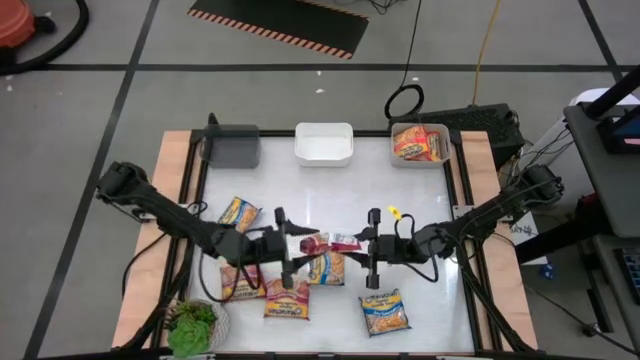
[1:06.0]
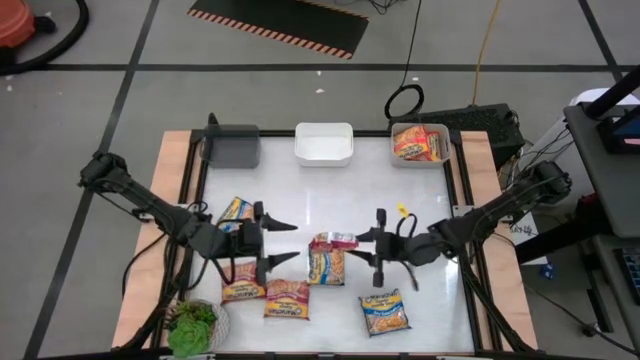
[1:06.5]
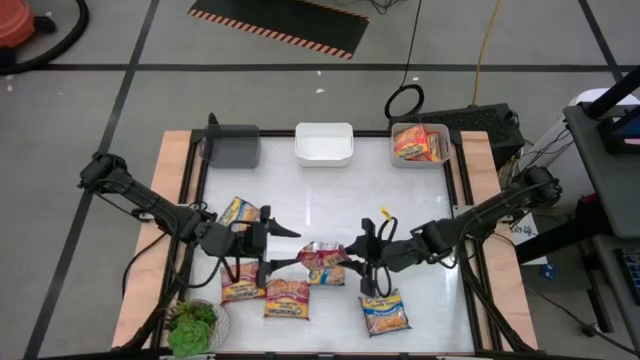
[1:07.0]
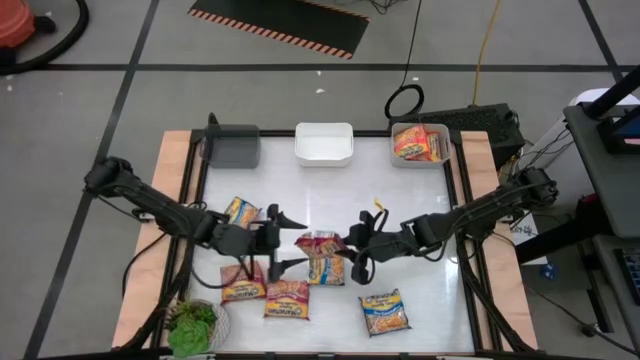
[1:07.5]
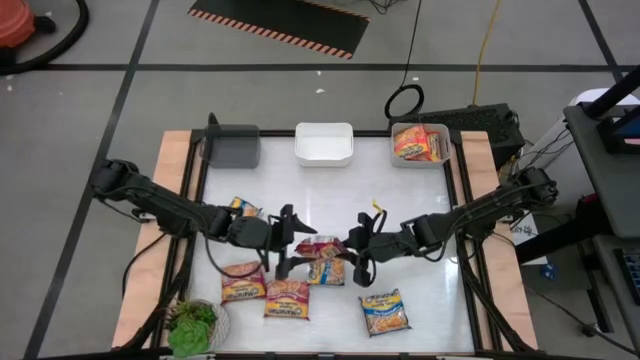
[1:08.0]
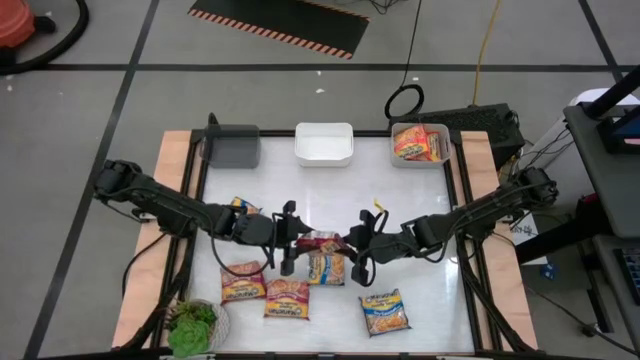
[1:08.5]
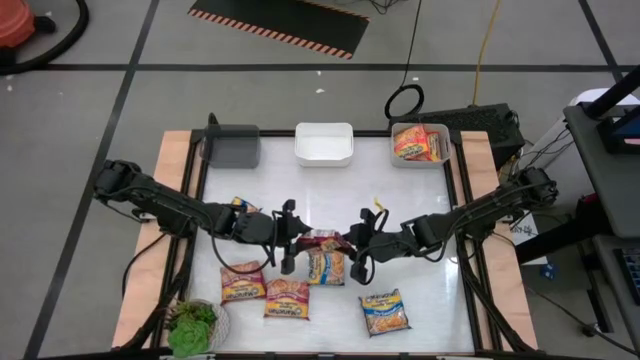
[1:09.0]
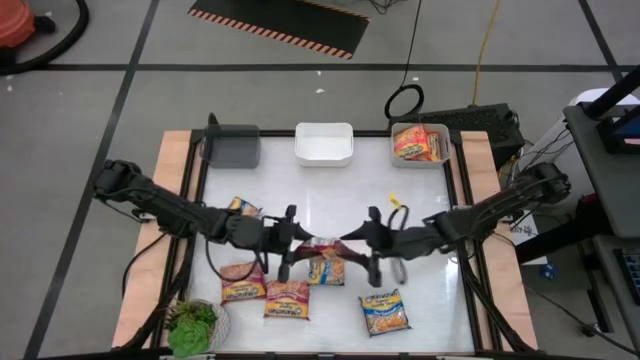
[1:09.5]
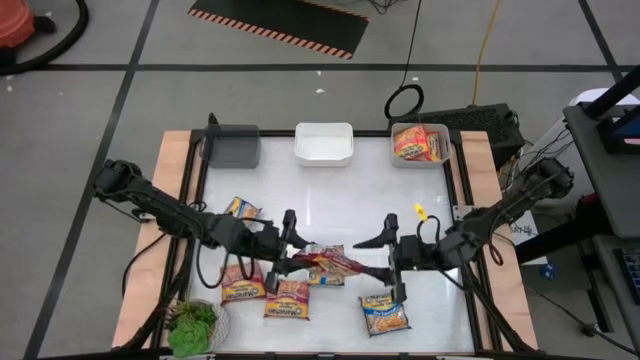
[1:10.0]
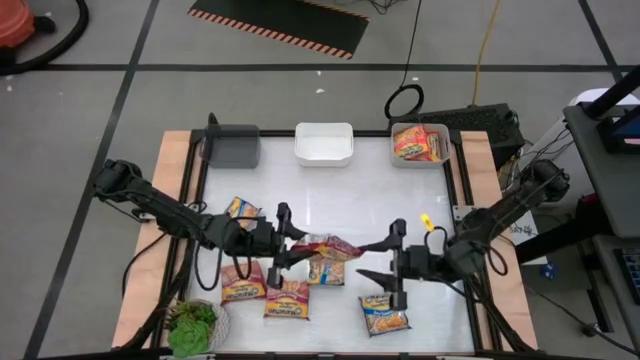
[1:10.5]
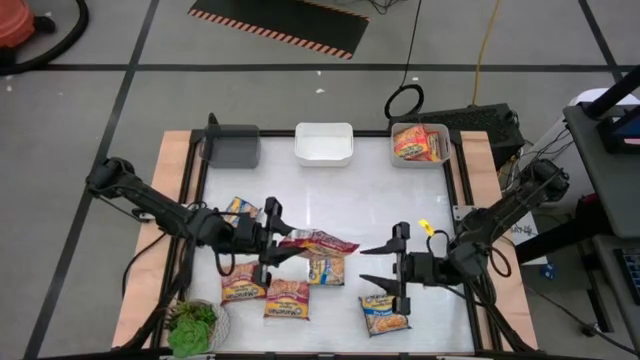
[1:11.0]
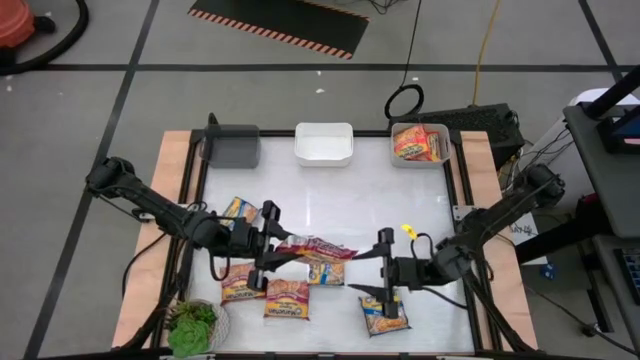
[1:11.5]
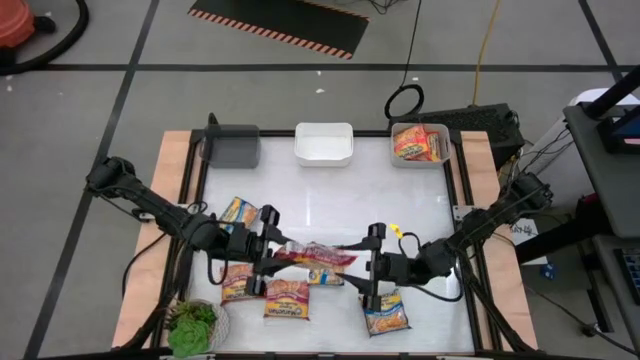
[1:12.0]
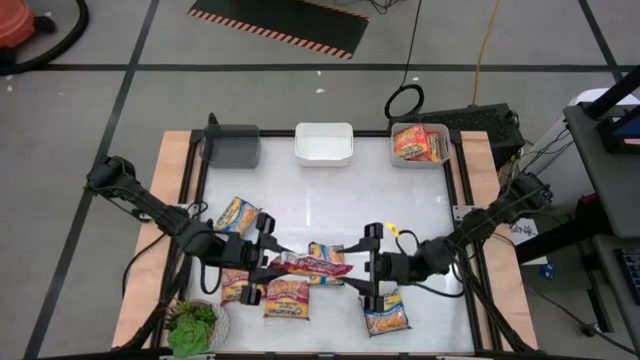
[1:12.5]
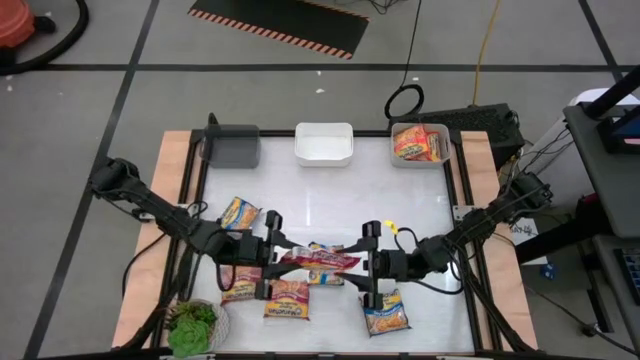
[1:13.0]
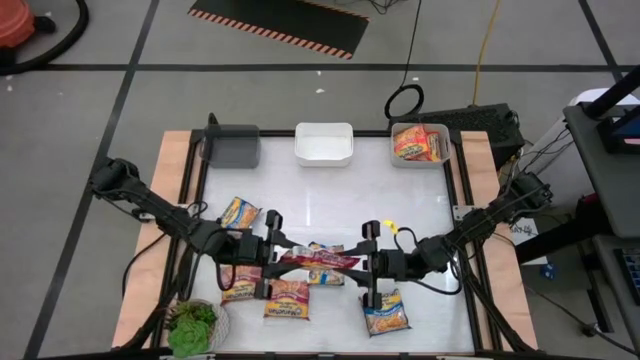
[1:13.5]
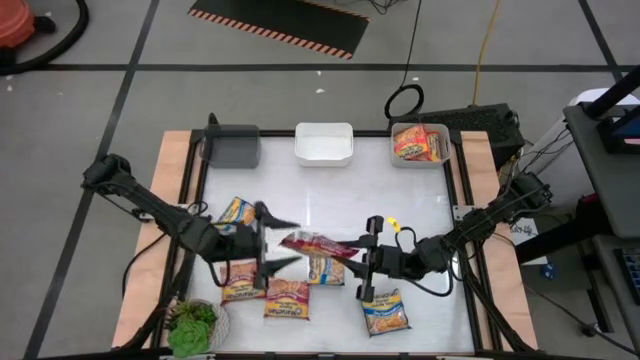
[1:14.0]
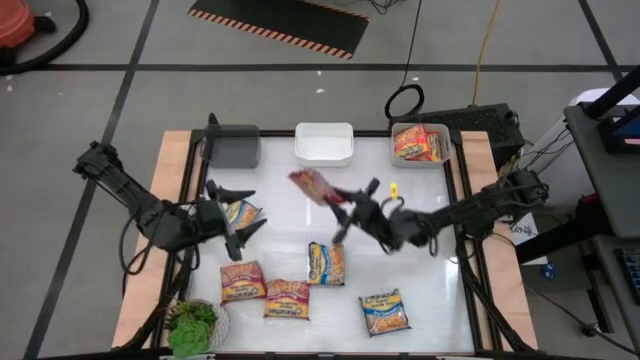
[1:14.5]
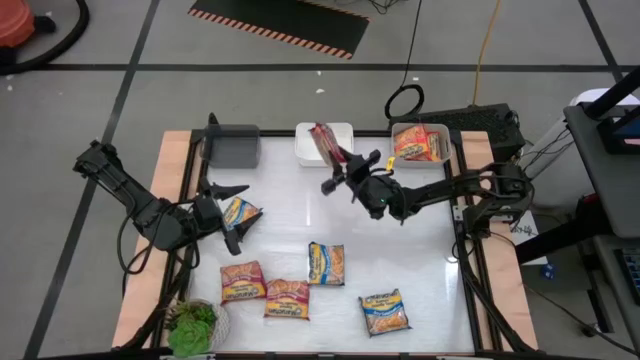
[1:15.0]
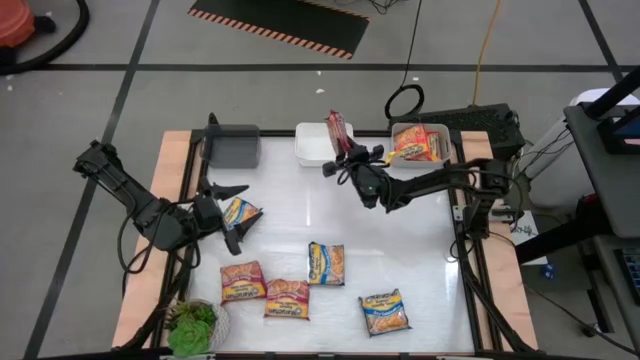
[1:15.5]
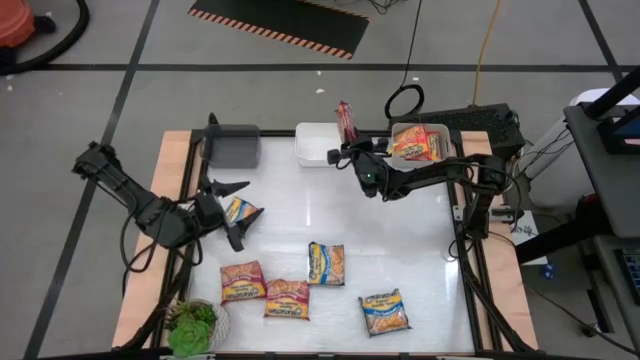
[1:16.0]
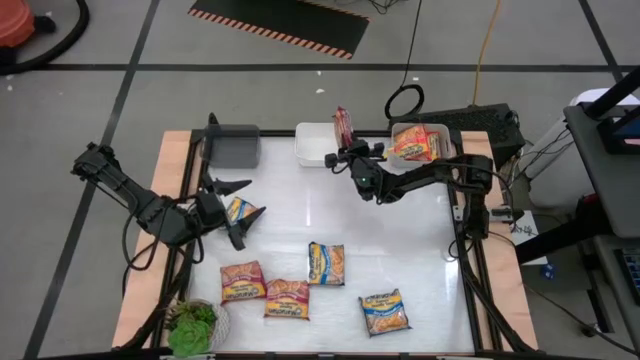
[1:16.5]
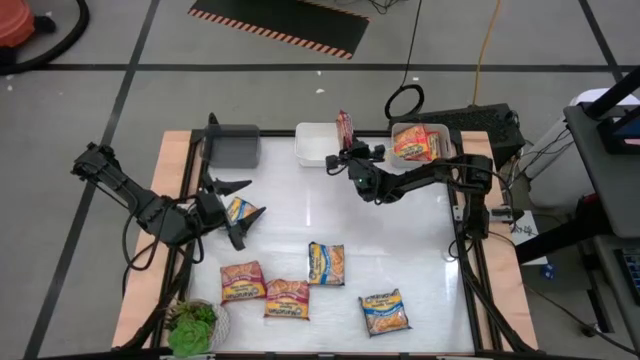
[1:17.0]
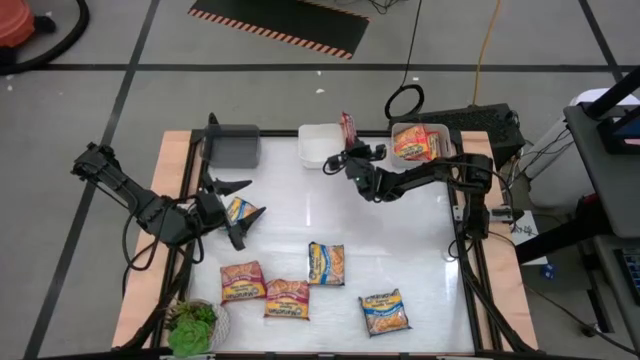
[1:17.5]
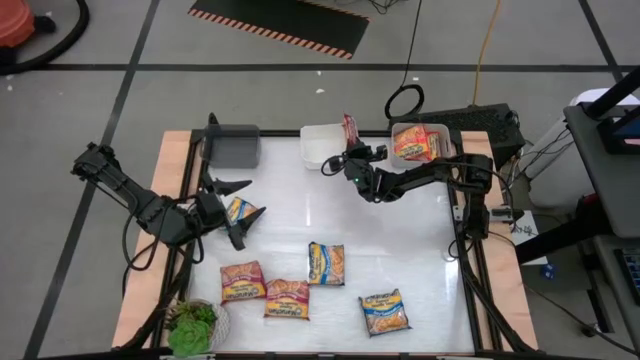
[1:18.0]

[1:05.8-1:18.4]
Task: Sort Maruchan noodles
Put the top red noodle pack into the white bin

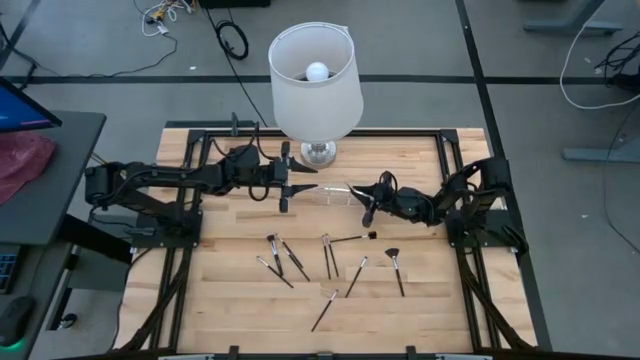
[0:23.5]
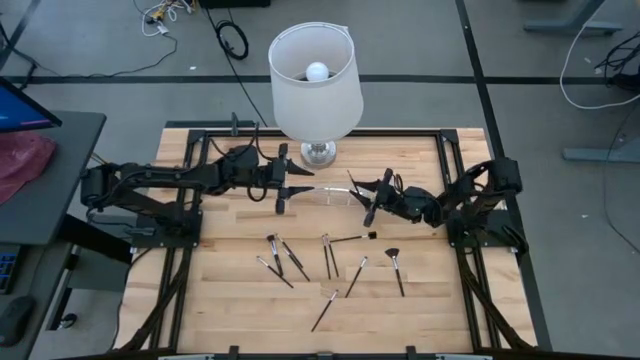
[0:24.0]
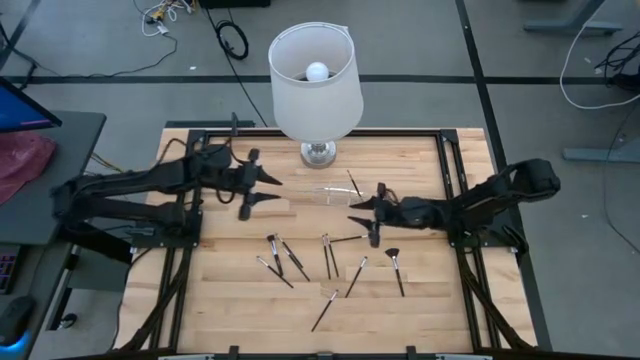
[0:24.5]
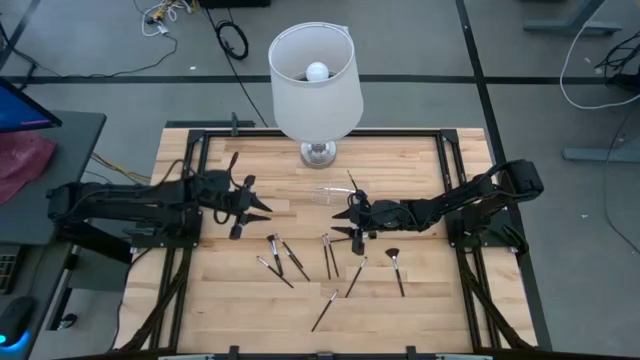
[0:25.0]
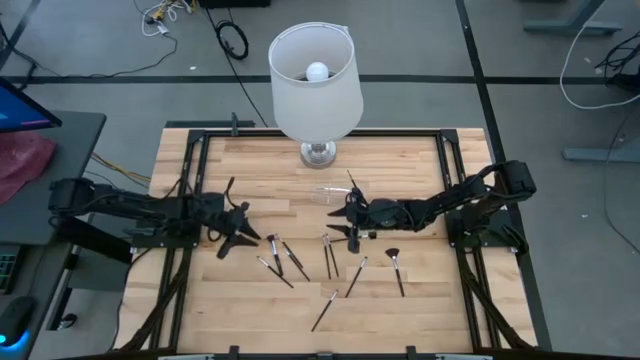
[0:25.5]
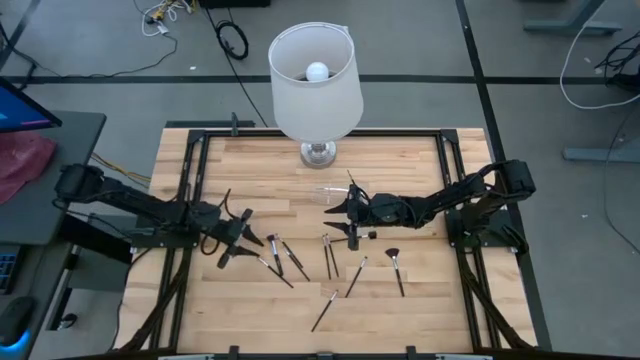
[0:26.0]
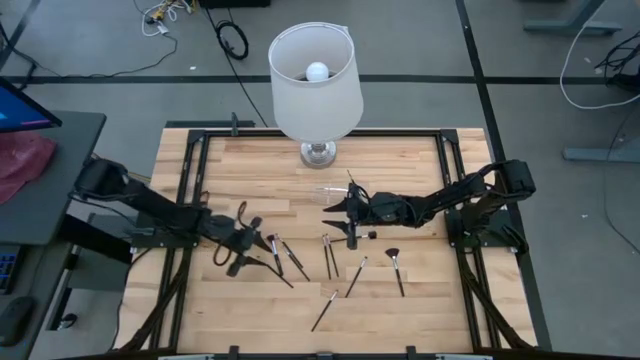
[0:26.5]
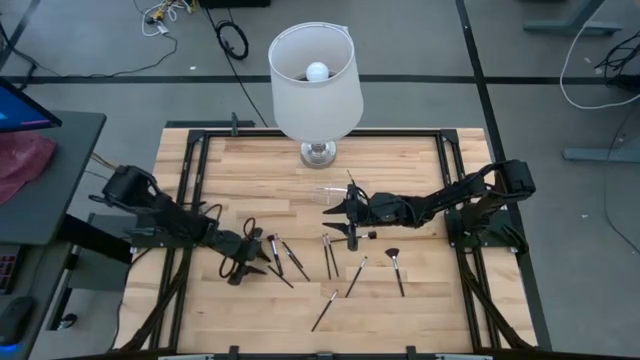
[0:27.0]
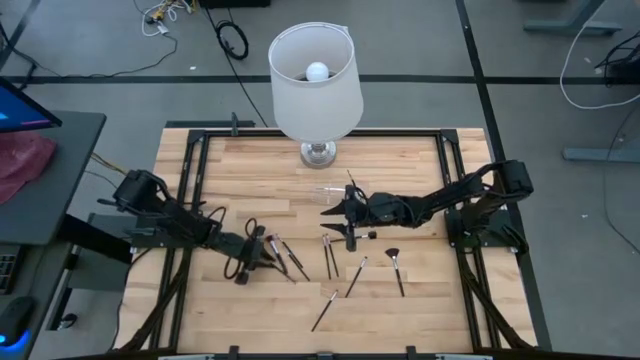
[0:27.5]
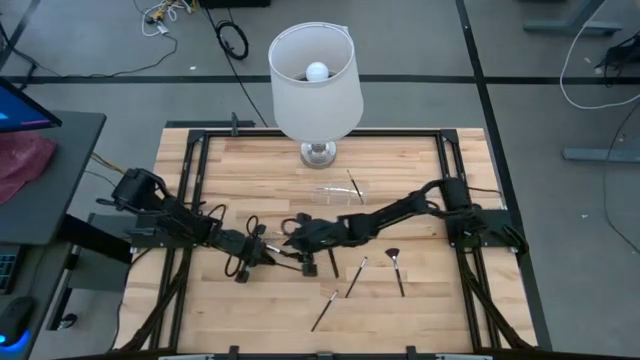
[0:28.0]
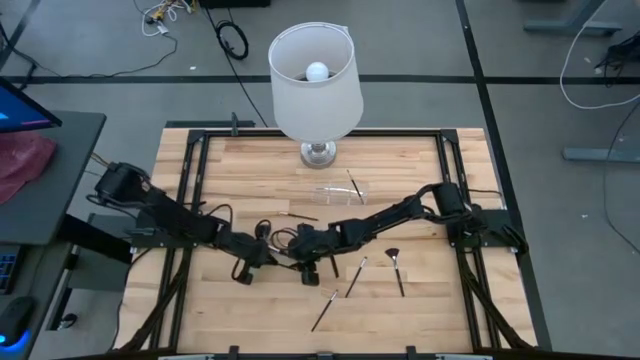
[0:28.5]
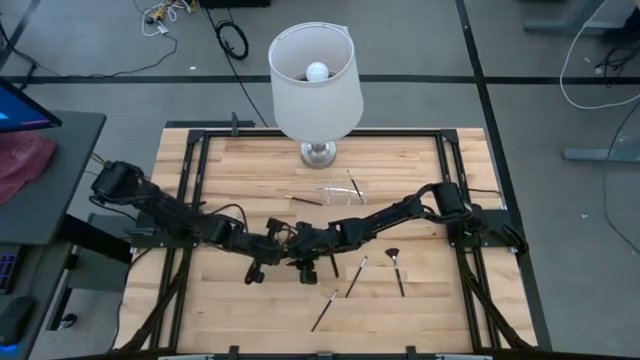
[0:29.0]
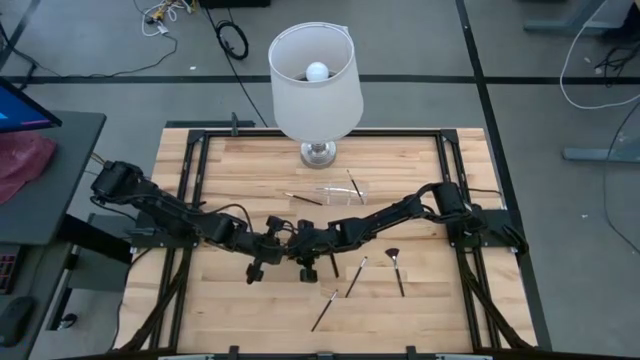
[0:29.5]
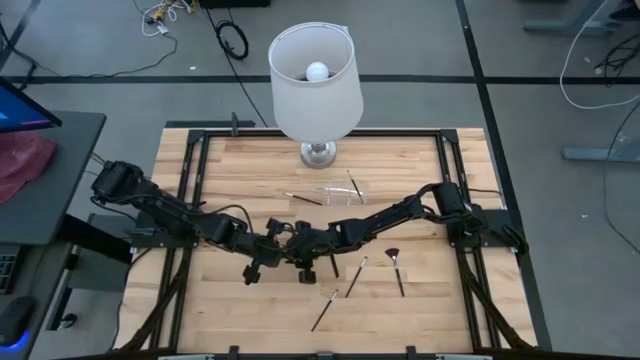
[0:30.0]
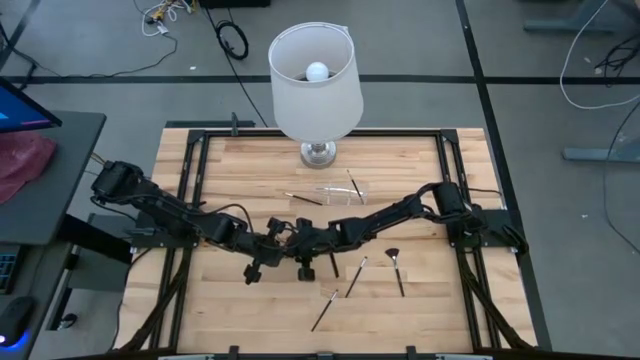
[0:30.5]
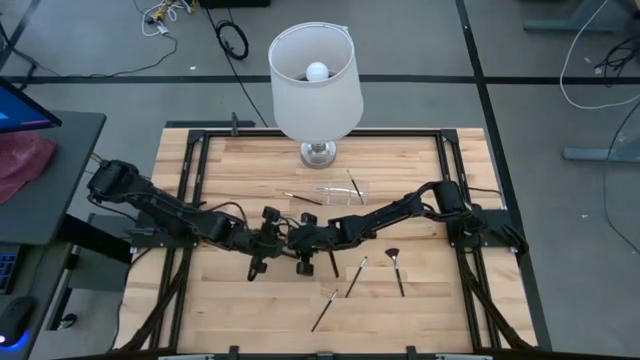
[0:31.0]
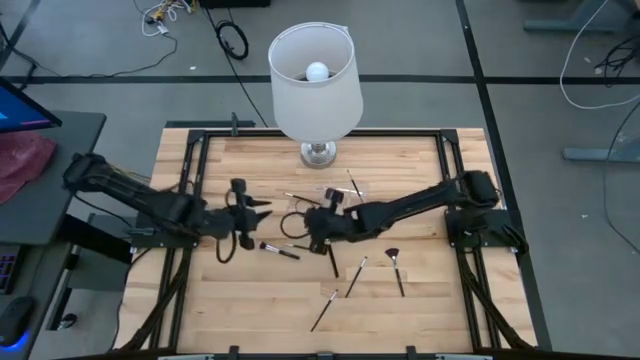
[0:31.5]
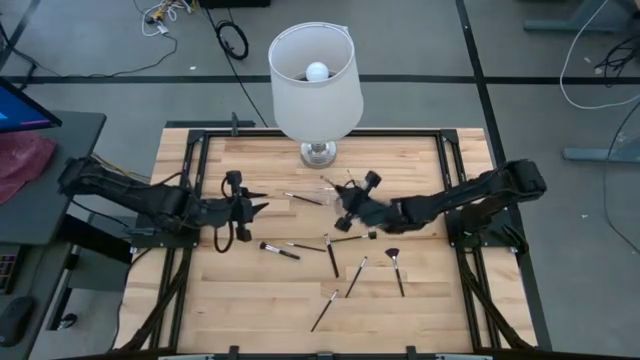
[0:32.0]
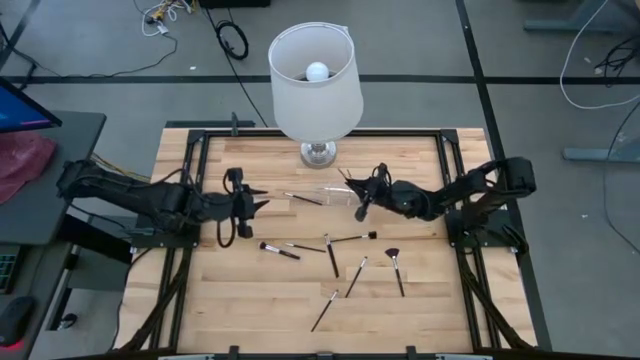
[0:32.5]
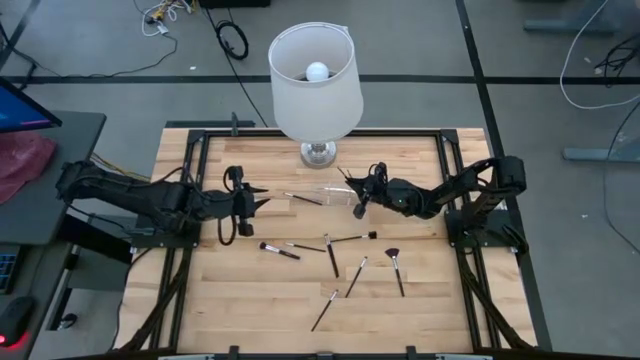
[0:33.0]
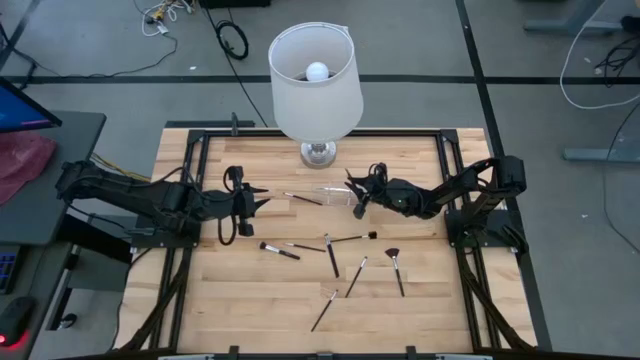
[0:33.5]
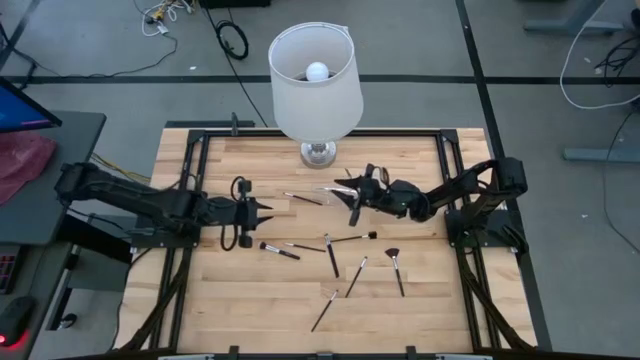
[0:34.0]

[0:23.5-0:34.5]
Task: Put items in baskets/containers
Put the black eyeshadow brush into the transparent organizer
